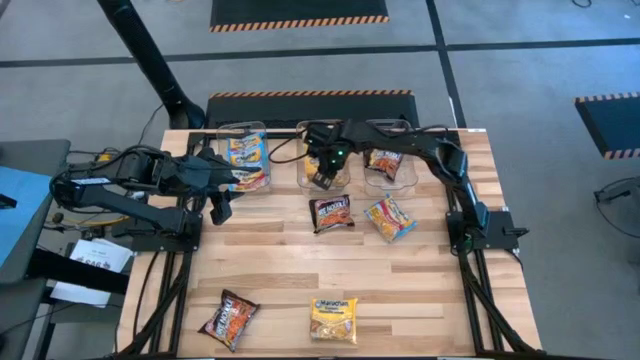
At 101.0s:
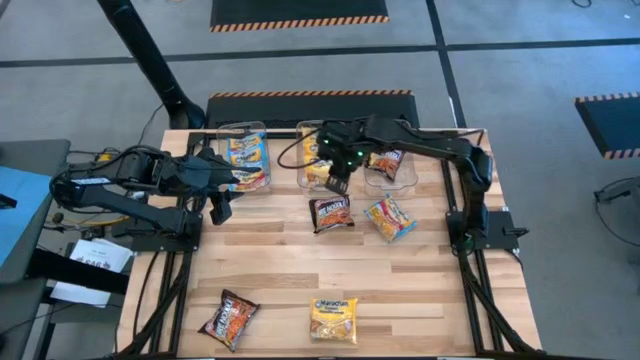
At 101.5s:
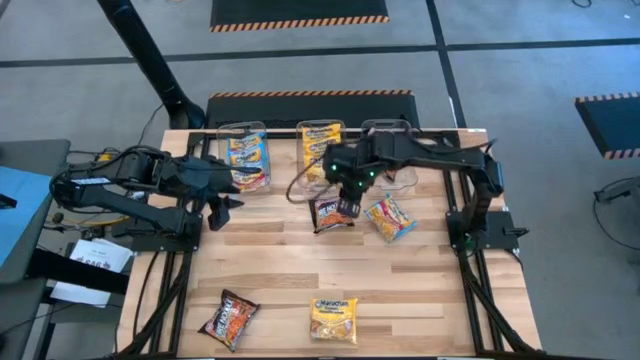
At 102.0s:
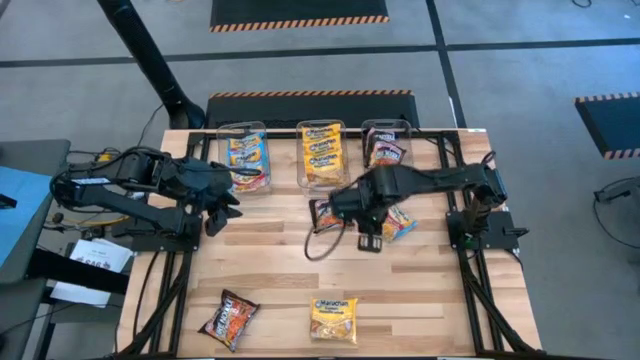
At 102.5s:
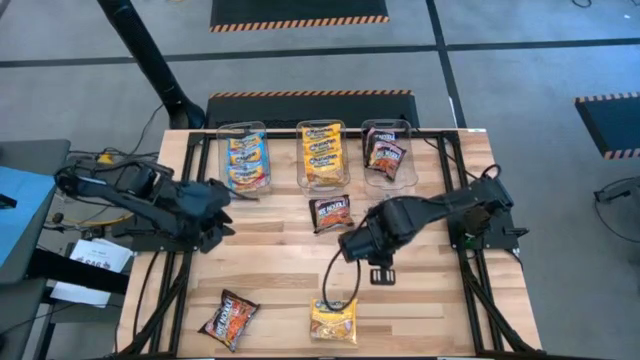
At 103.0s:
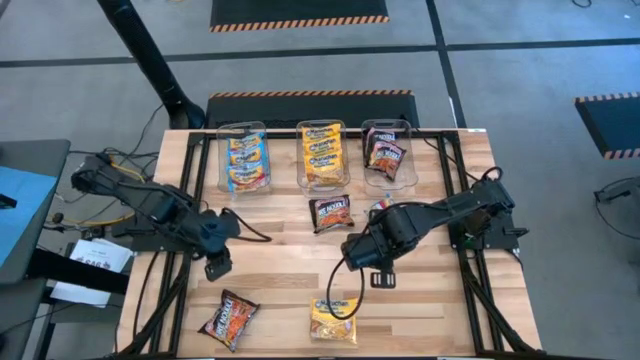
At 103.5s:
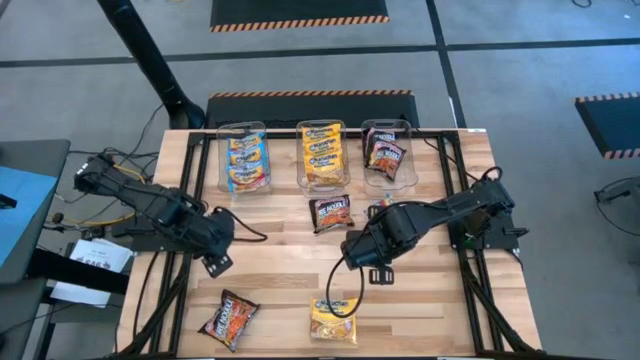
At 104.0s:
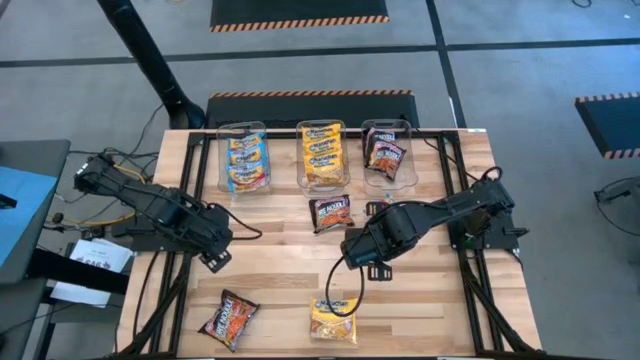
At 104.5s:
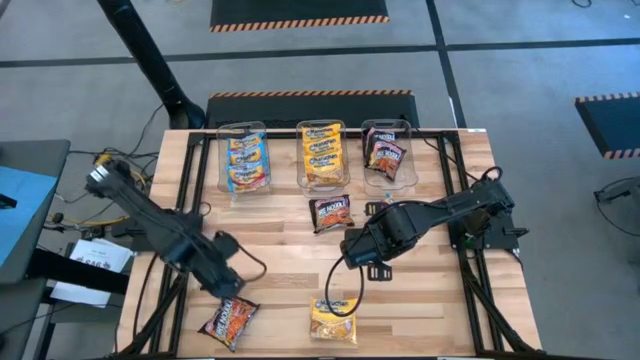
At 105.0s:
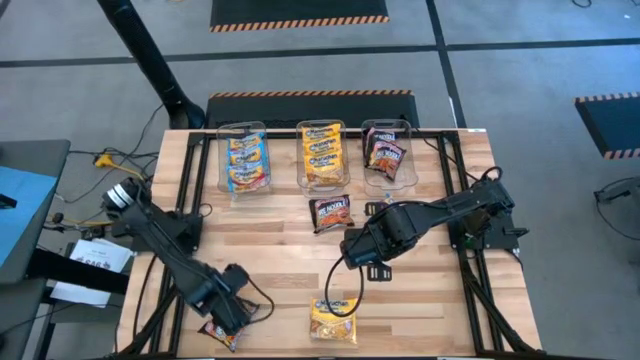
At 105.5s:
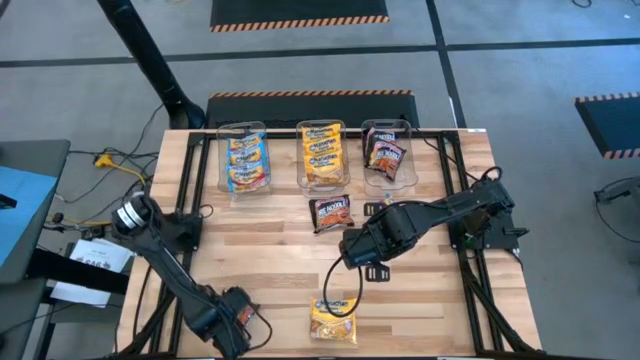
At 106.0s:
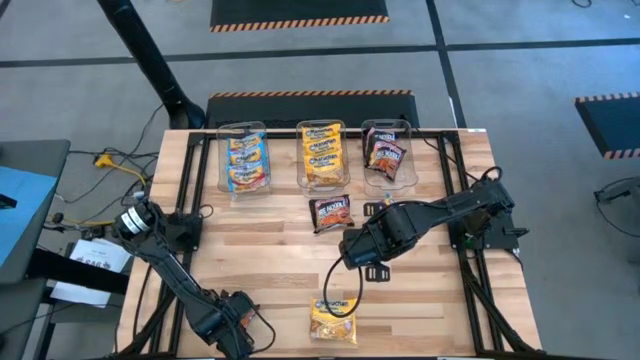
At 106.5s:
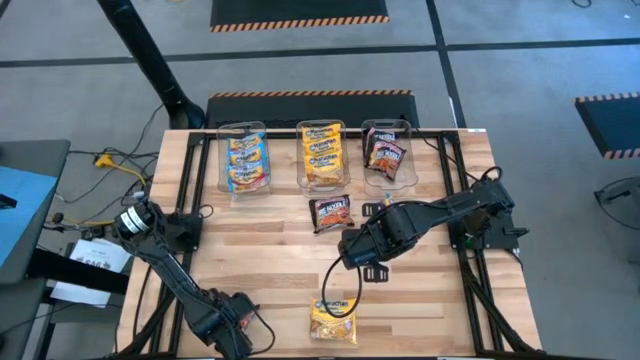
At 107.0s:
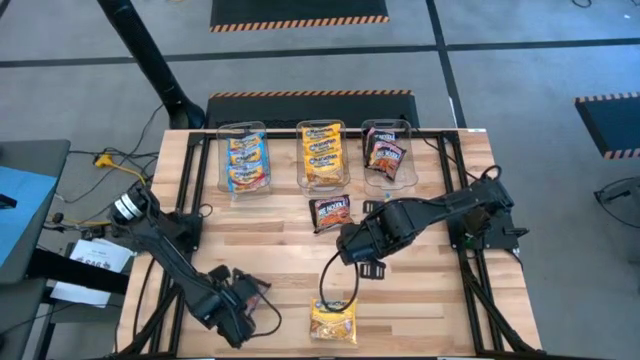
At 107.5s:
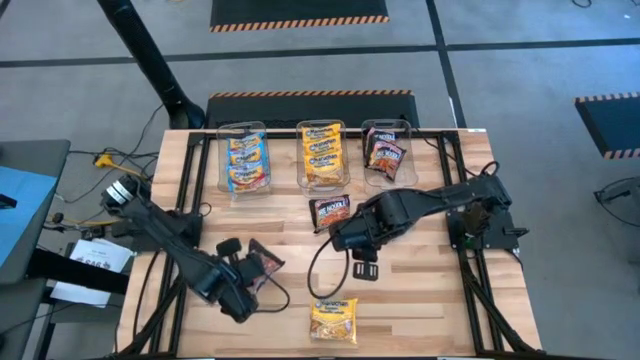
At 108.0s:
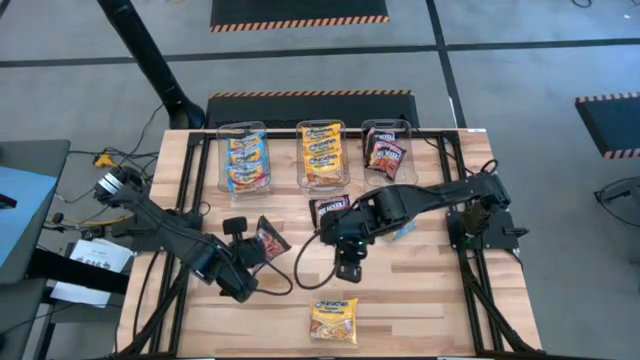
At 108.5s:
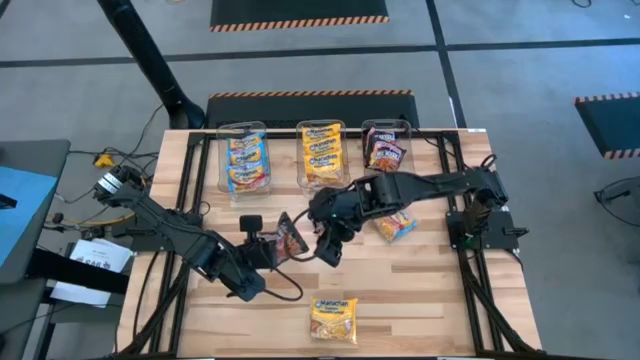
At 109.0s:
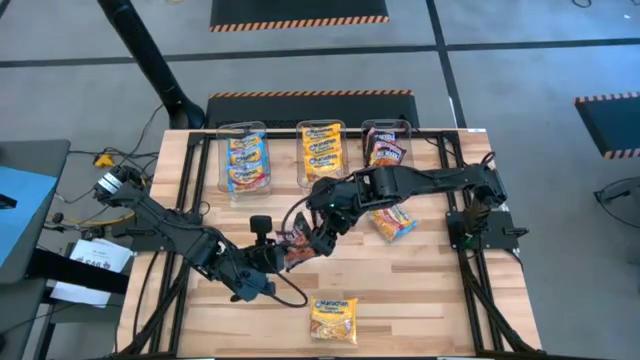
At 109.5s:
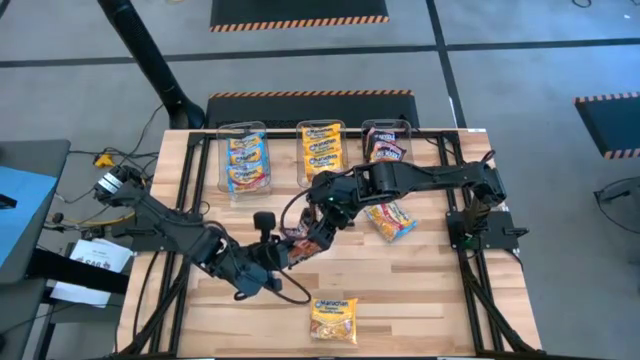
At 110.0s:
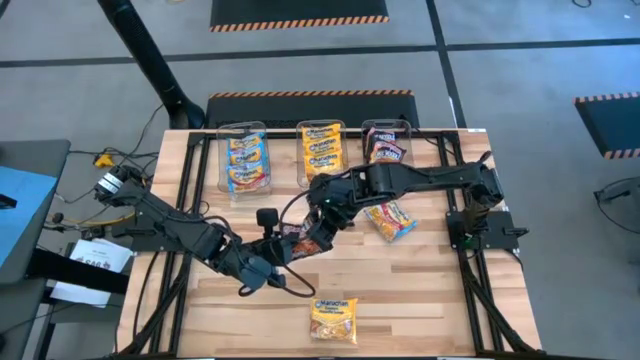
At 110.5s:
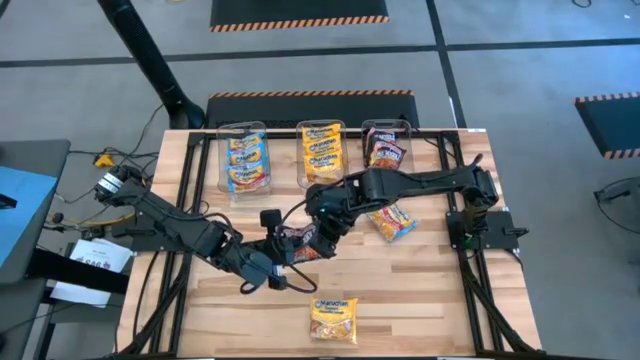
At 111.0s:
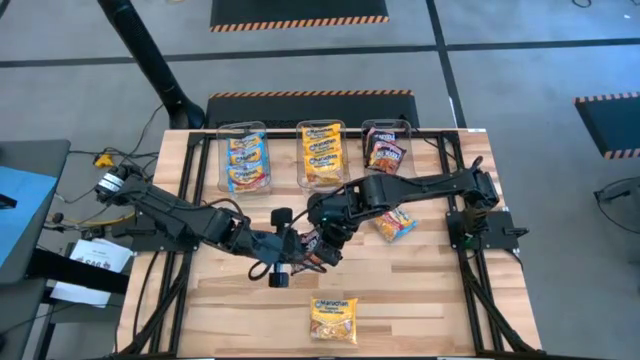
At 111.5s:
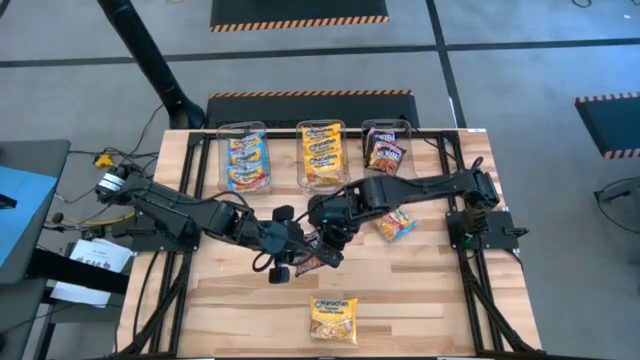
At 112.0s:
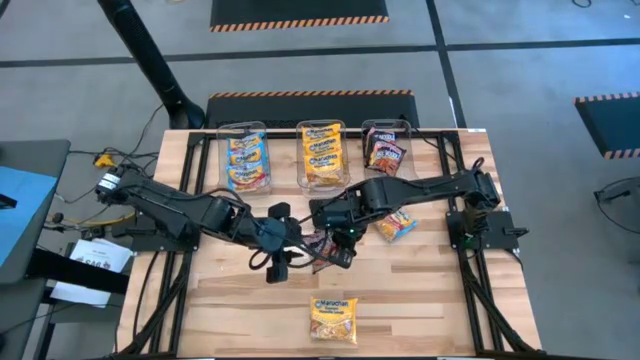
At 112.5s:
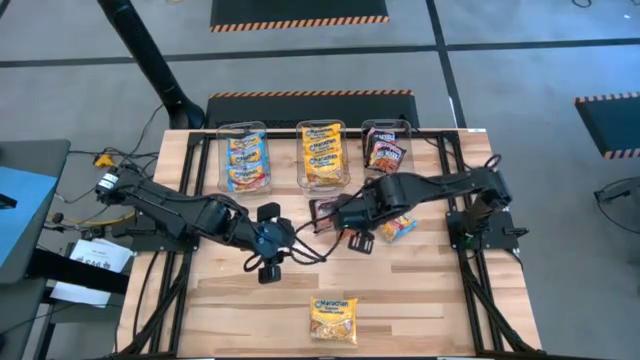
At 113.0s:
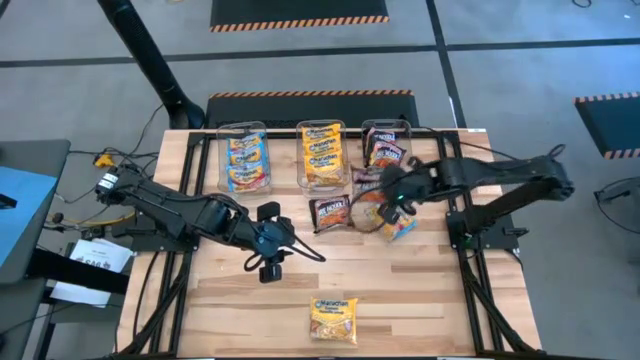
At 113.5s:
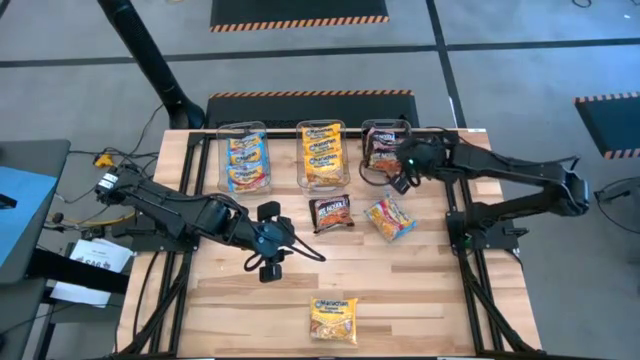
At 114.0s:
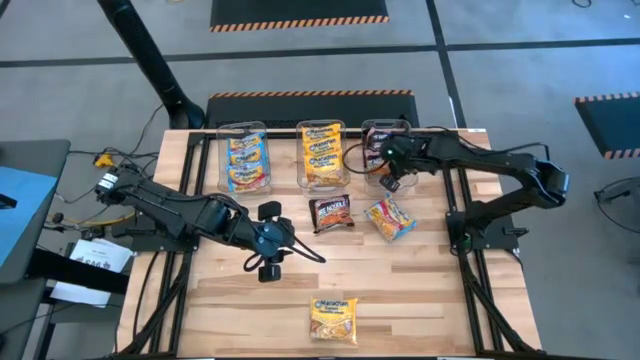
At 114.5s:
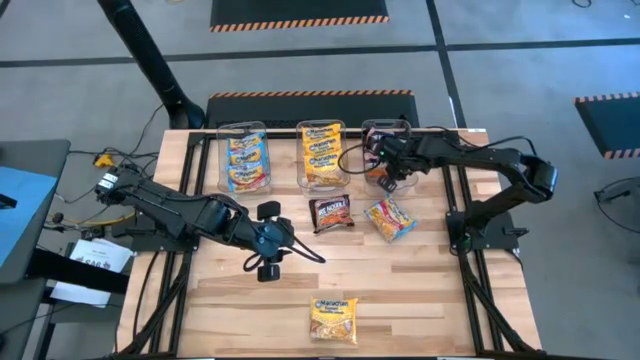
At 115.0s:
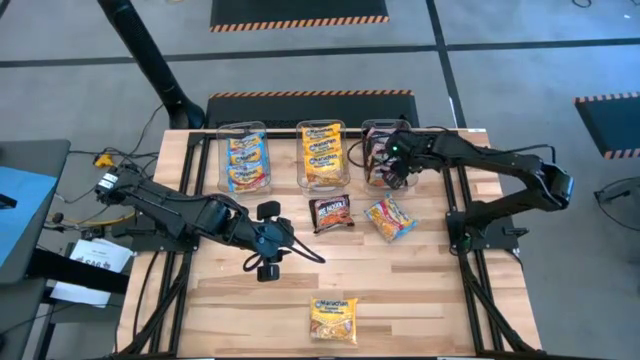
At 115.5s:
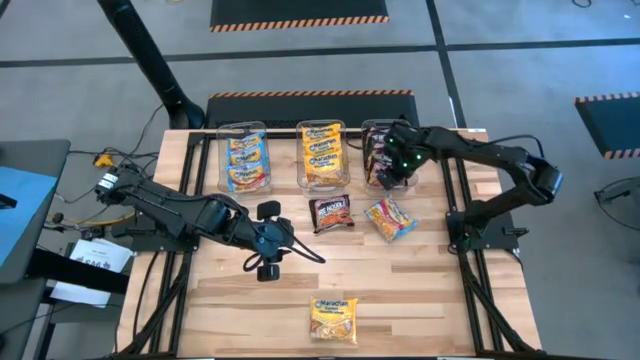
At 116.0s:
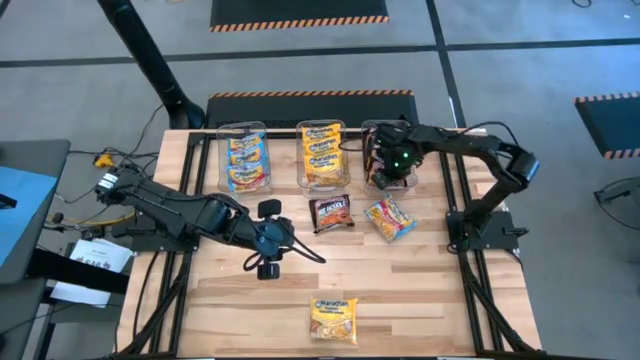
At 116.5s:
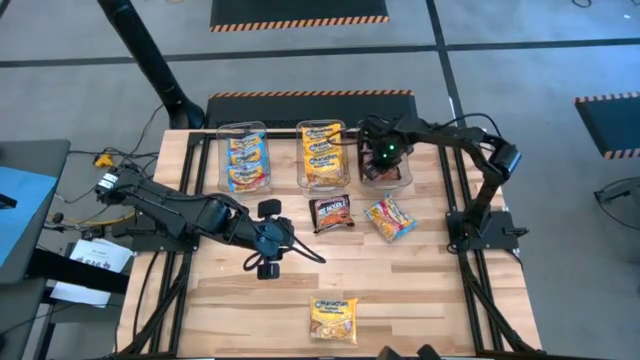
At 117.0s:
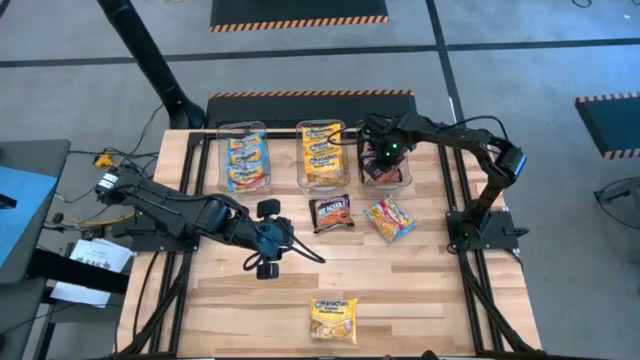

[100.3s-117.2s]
Task: Sort Maruchan noodles
Put the black noodle pack into the right transparent bin

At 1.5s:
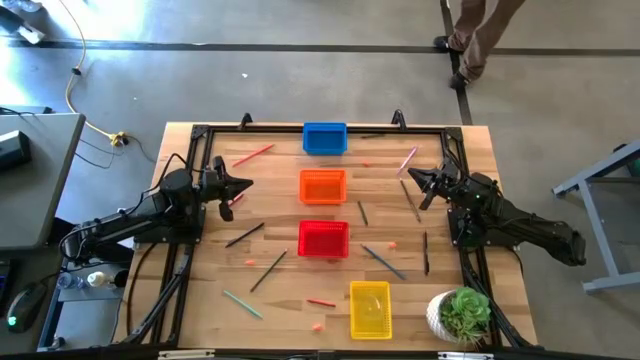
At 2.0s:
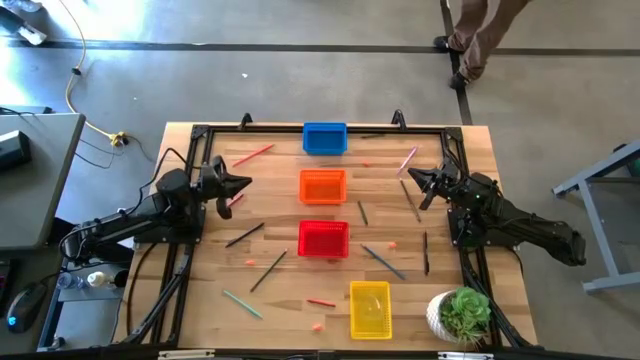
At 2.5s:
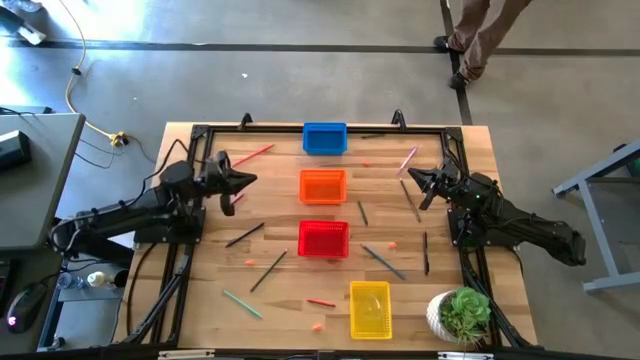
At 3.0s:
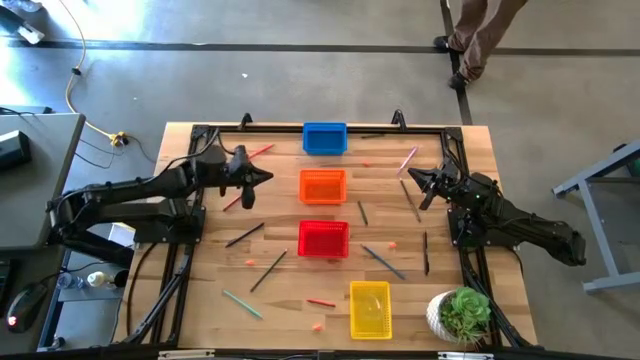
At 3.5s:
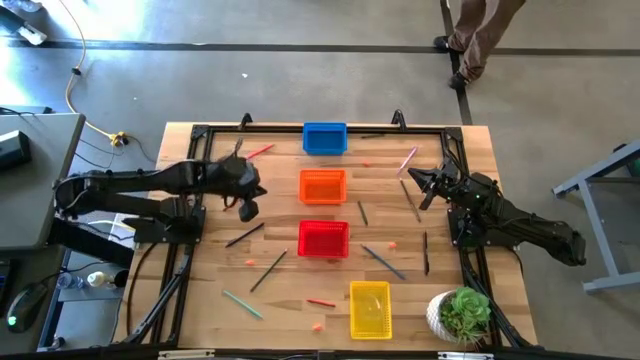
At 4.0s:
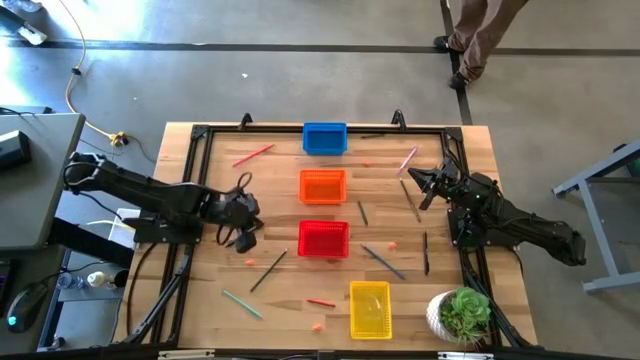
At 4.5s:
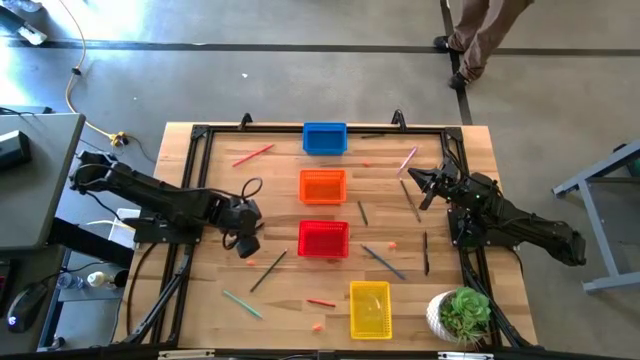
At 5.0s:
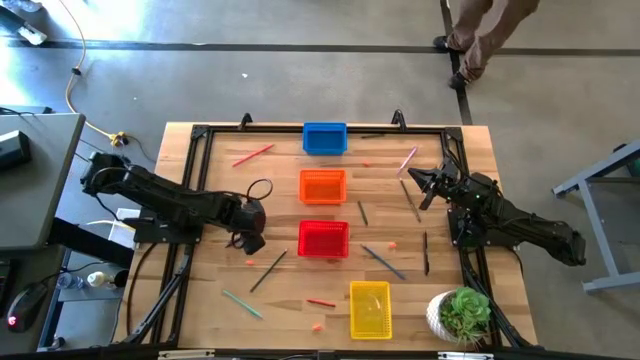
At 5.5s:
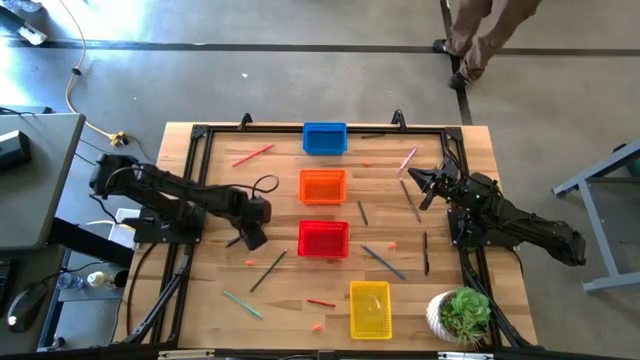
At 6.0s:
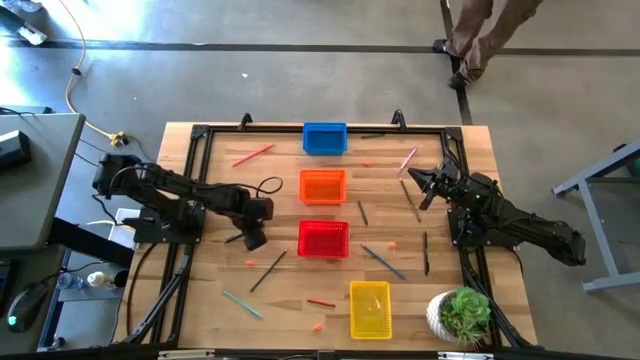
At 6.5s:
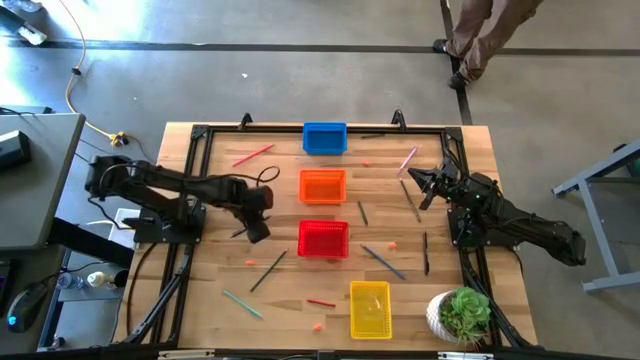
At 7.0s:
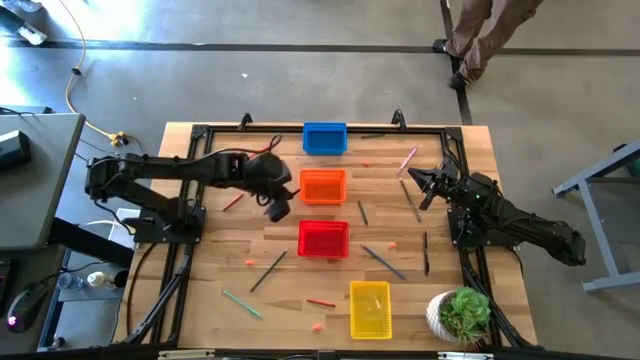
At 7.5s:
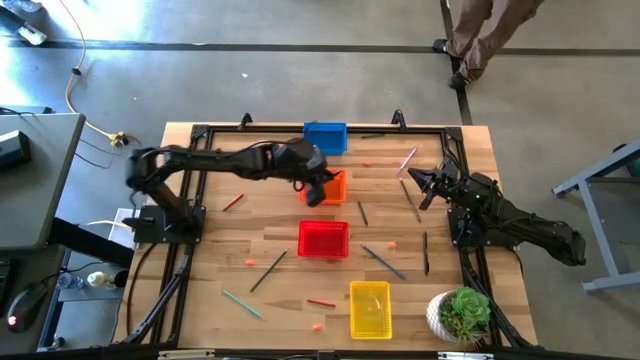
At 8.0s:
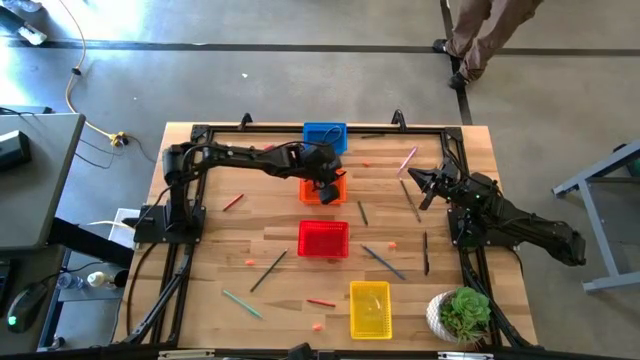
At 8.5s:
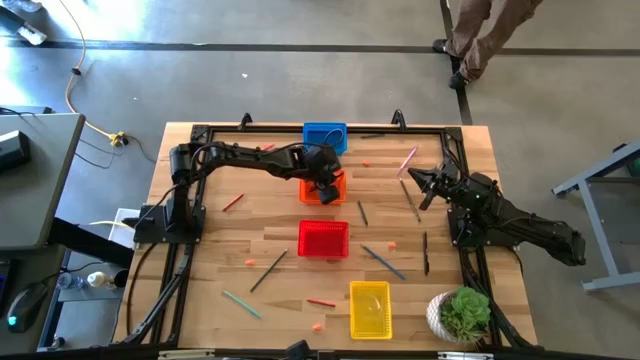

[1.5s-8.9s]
Task: Sort crayons/erasers/pens/pencils in bins
Put the black pen into the orange bin
